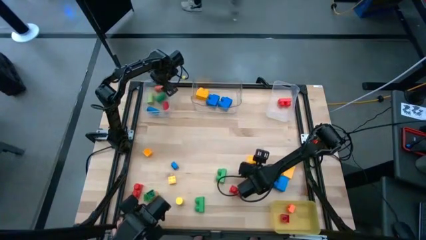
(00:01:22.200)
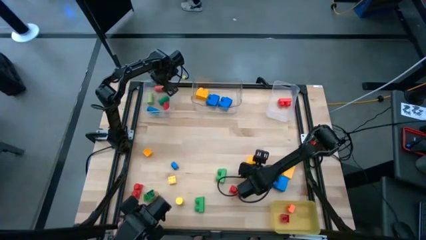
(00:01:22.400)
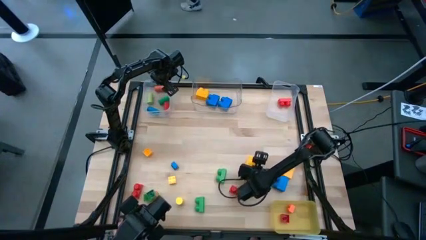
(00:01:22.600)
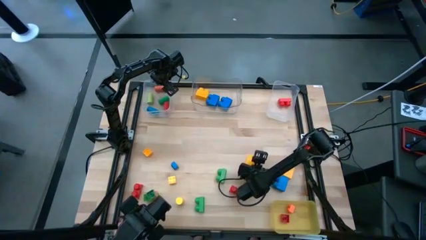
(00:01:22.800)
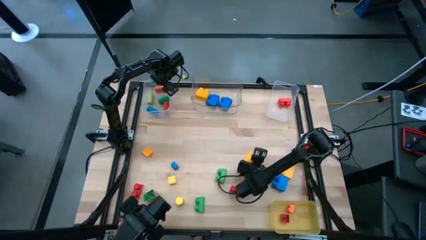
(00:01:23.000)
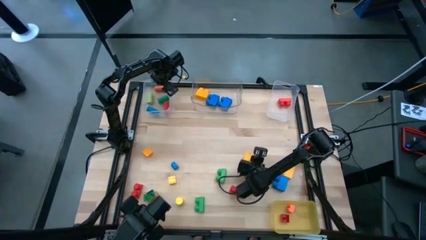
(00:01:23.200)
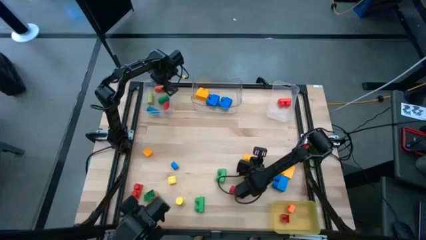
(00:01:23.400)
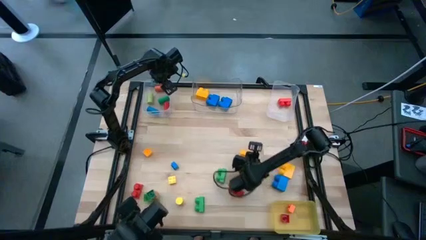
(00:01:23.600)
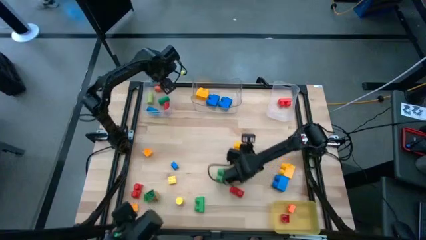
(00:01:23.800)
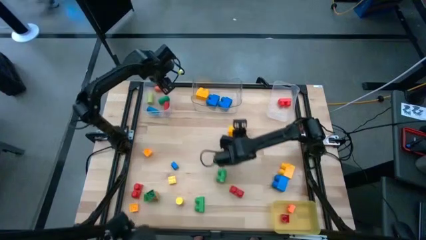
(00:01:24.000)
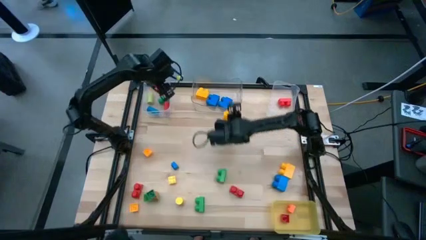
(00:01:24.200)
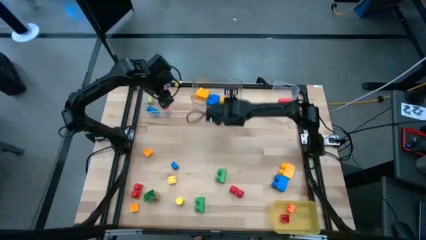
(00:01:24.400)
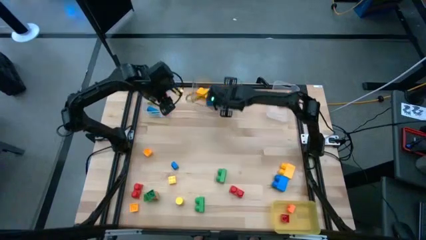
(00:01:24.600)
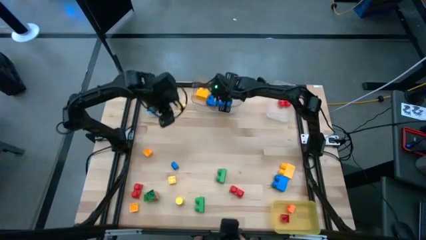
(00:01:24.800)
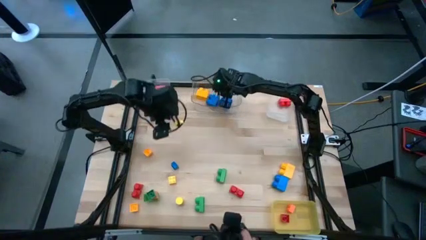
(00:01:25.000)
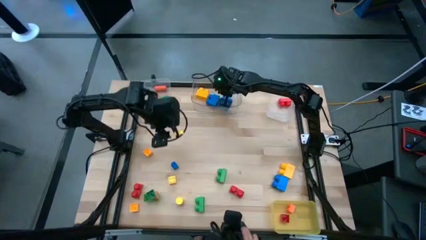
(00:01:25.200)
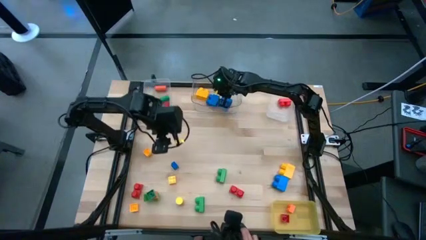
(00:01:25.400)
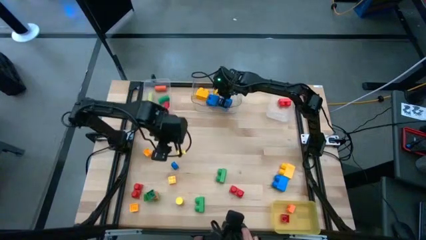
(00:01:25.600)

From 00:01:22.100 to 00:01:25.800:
Task: Sort blocks by size
Put the large yellow game piece in the middle transparent bin

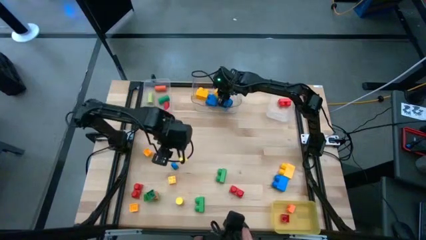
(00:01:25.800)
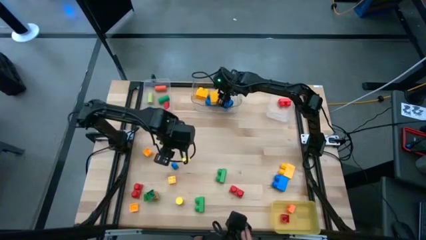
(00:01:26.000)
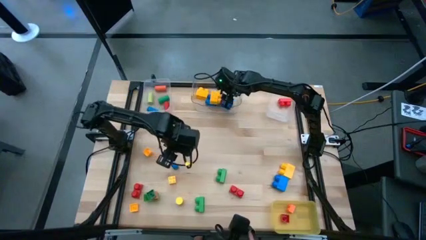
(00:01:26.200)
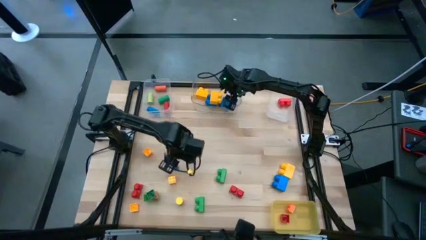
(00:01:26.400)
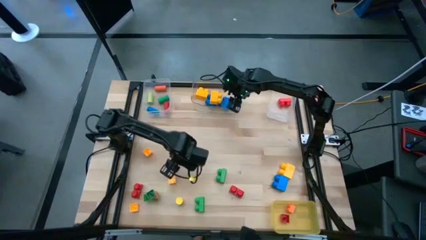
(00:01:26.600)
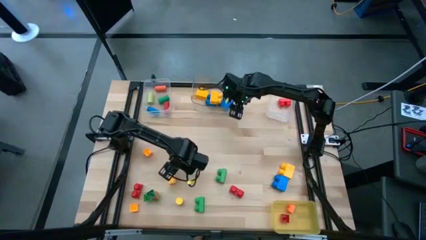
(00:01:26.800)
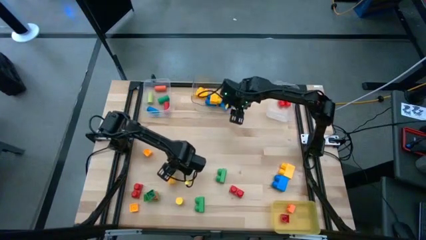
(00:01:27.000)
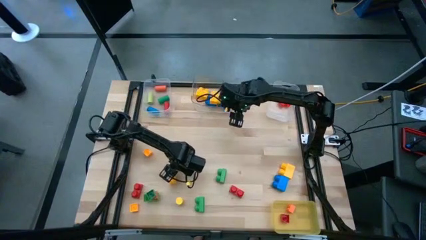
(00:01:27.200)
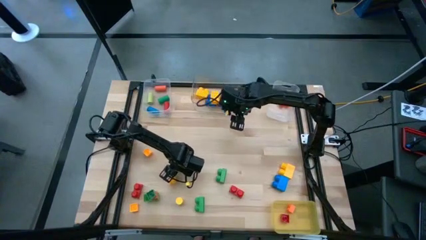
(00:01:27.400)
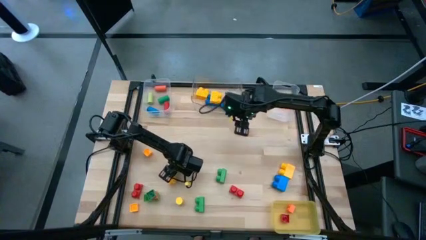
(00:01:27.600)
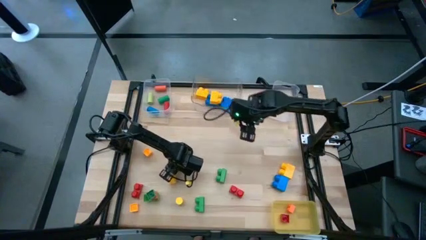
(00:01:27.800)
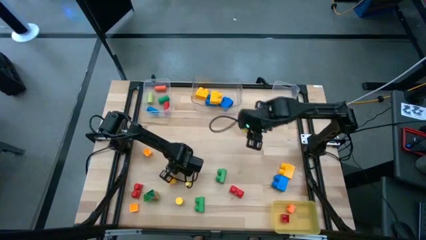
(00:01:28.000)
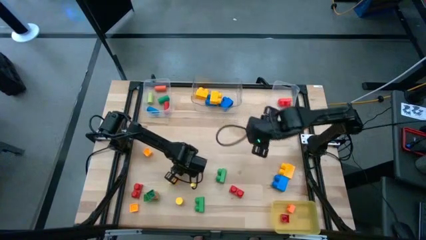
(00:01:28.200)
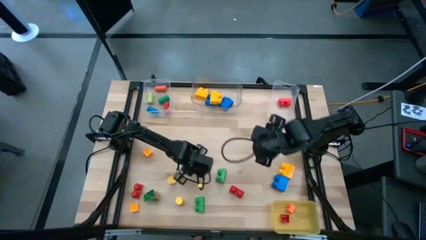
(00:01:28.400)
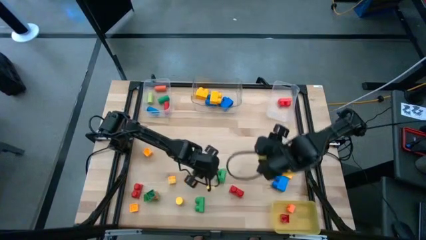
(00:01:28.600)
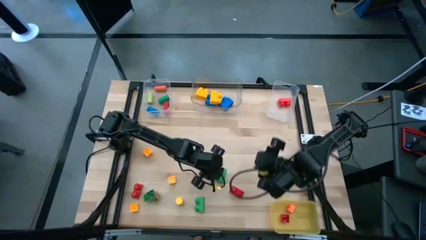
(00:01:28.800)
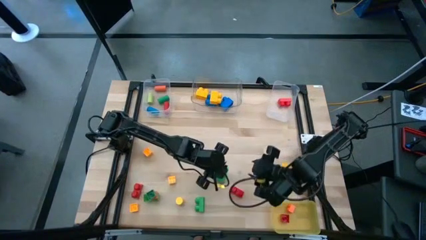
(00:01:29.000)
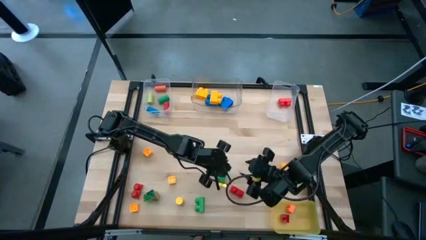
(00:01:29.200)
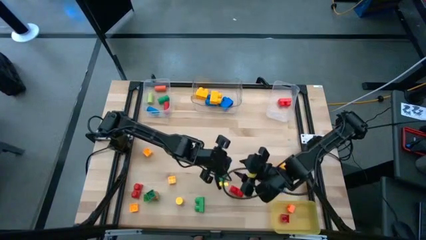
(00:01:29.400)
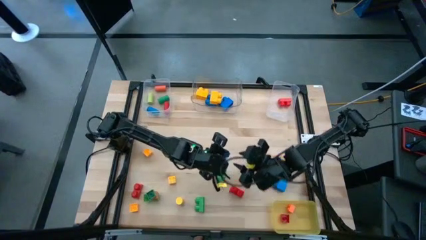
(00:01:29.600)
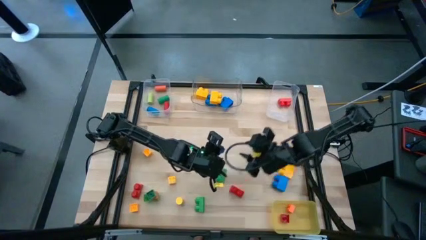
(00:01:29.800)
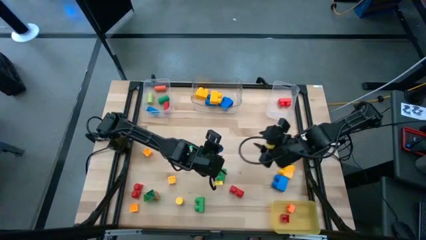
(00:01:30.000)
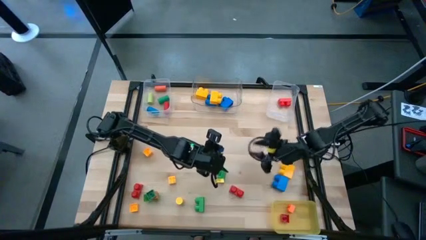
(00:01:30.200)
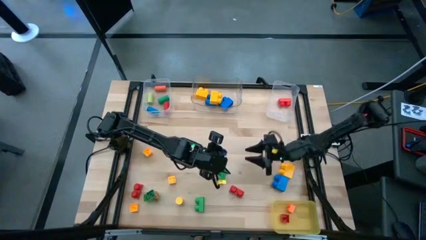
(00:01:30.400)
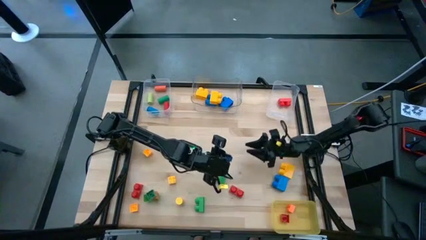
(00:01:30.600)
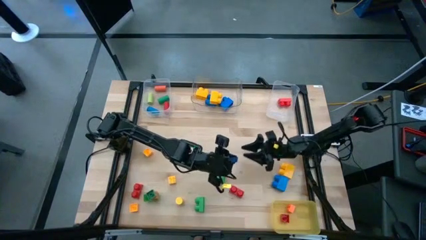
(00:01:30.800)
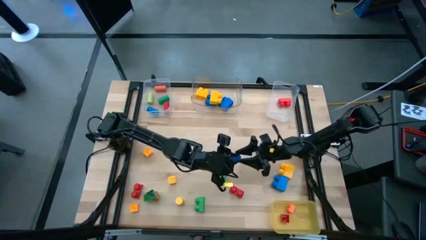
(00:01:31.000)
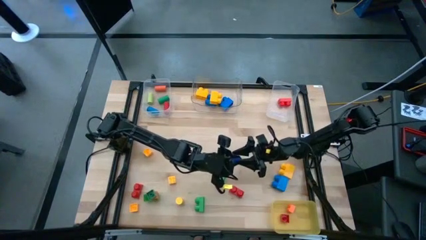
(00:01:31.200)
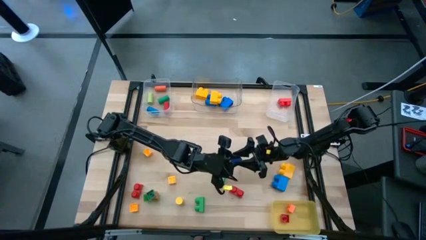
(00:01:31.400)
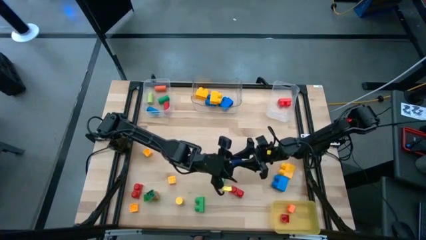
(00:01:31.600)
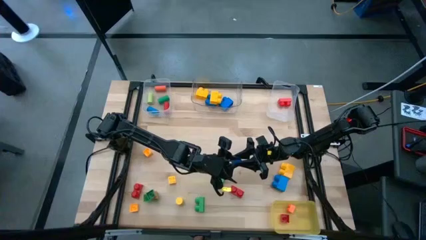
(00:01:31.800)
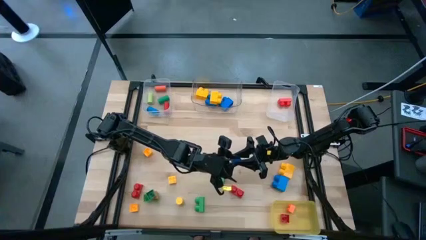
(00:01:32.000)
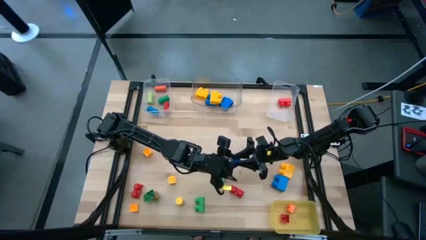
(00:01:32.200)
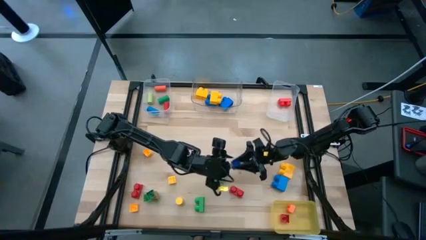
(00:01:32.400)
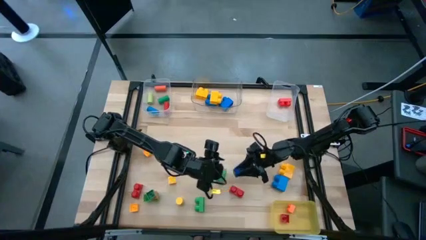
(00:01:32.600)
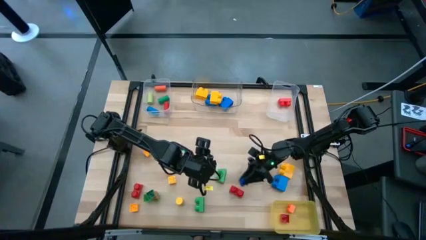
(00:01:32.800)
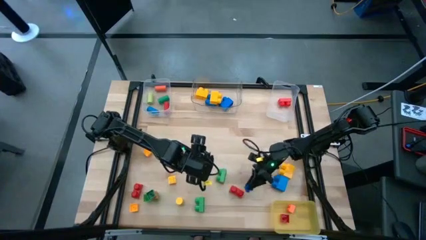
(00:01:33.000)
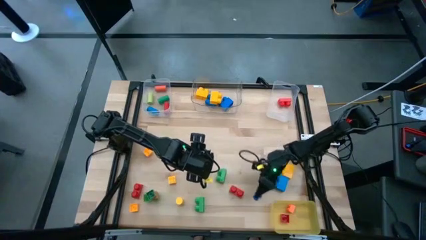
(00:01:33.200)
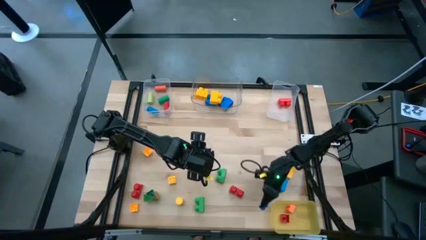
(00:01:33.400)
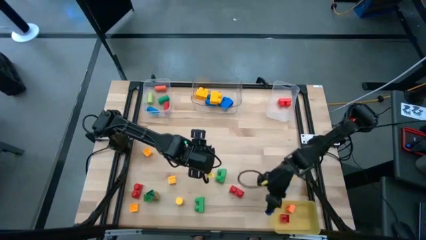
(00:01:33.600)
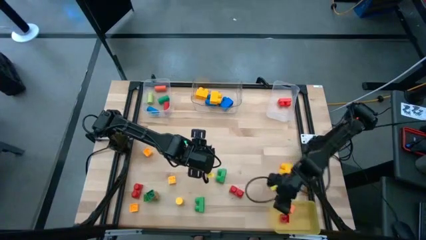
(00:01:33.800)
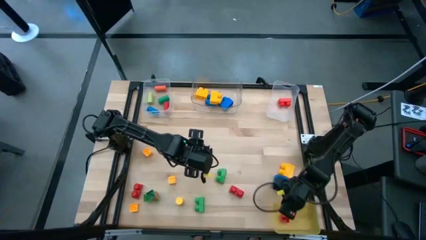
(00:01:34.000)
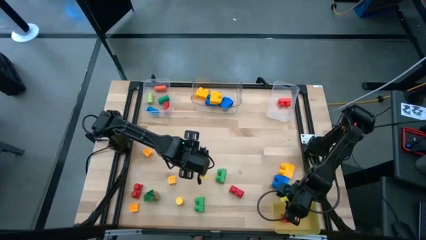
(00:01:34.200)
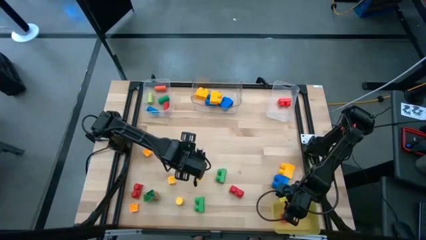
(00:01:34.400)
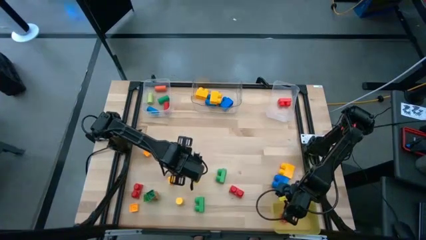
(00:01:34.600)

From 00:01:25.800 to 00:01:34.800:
Put the small blue game piece into the yellow bin
